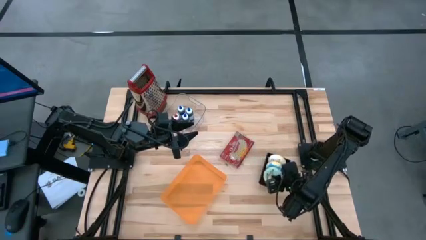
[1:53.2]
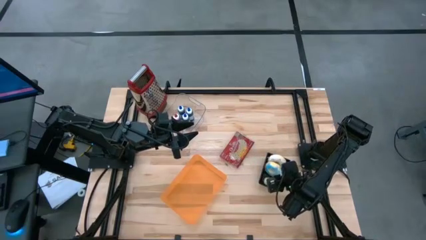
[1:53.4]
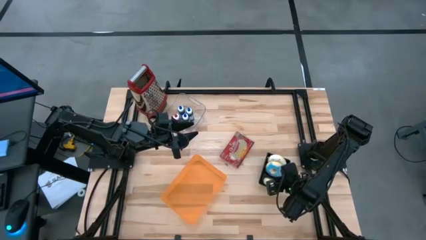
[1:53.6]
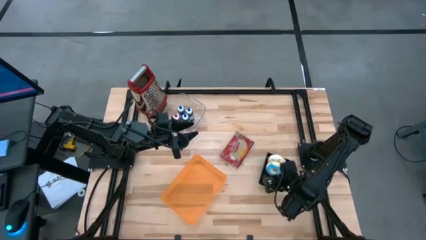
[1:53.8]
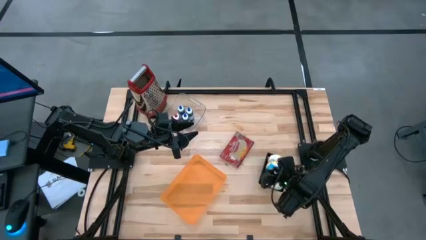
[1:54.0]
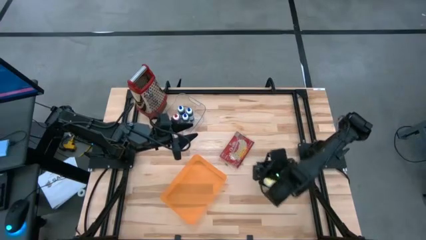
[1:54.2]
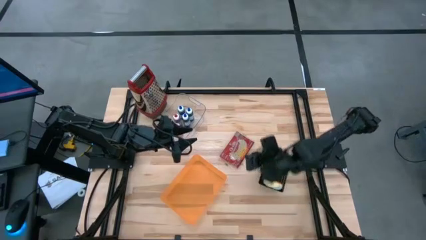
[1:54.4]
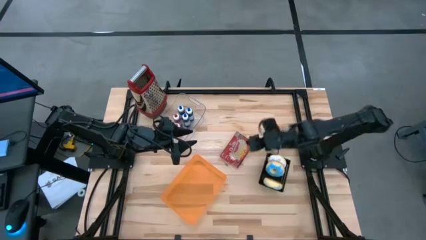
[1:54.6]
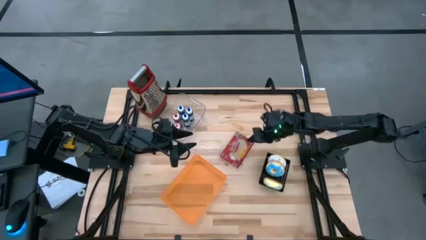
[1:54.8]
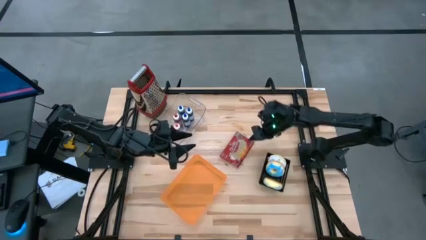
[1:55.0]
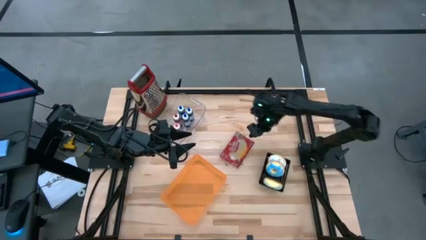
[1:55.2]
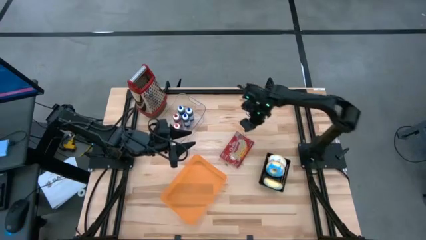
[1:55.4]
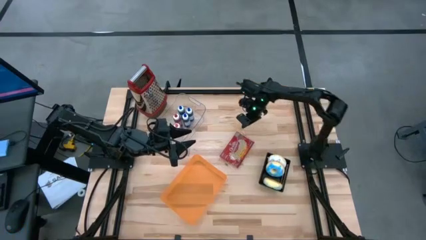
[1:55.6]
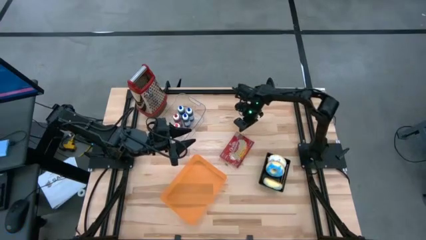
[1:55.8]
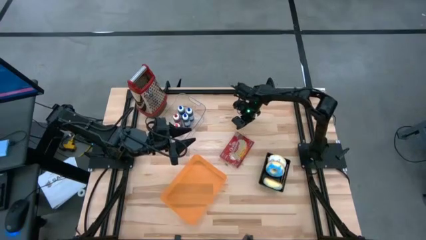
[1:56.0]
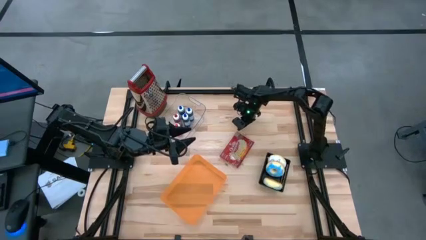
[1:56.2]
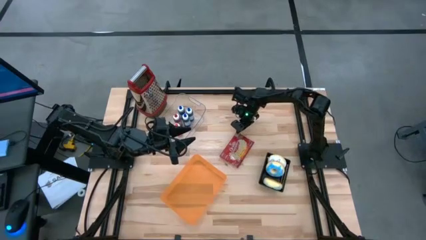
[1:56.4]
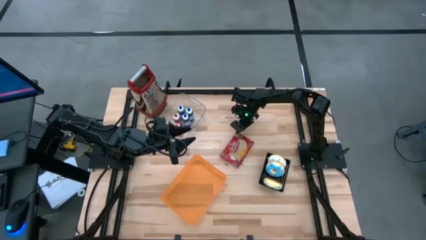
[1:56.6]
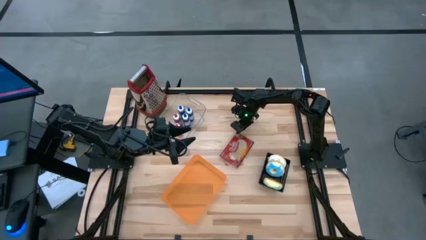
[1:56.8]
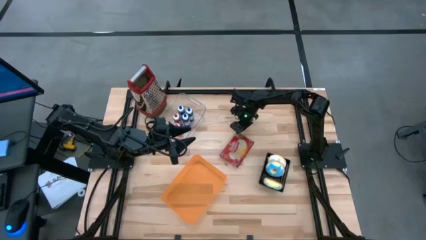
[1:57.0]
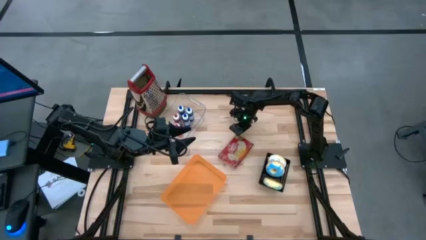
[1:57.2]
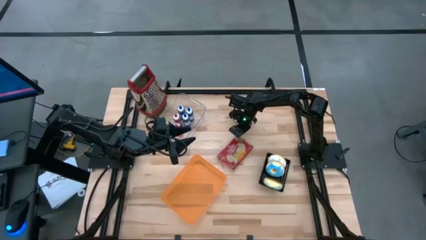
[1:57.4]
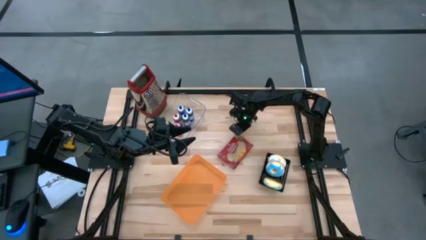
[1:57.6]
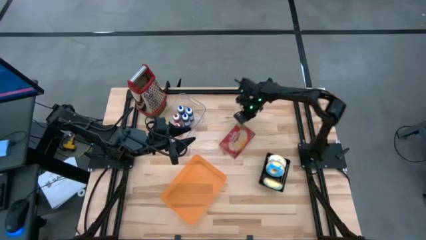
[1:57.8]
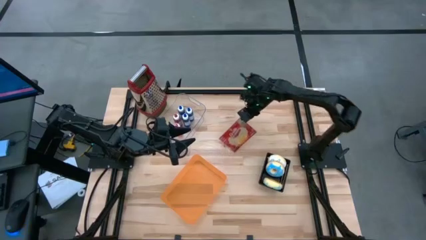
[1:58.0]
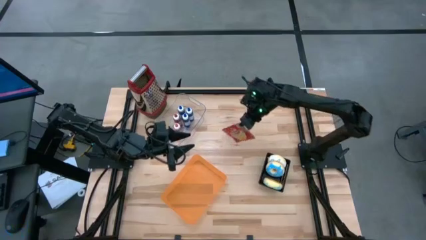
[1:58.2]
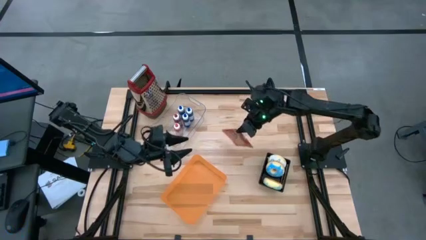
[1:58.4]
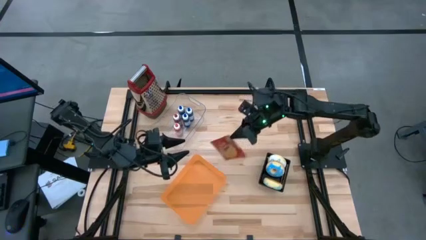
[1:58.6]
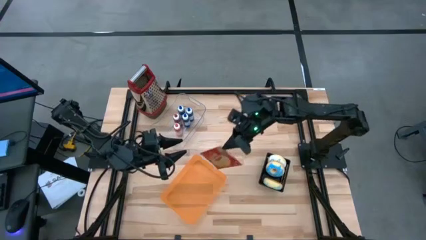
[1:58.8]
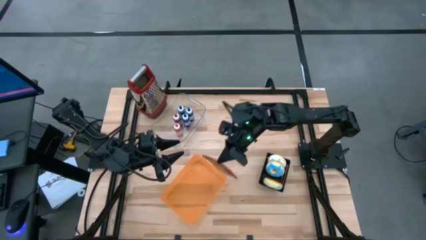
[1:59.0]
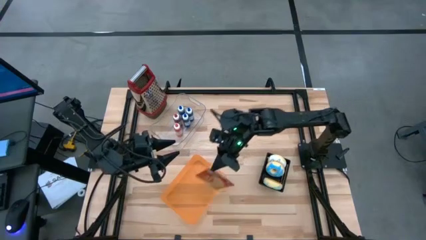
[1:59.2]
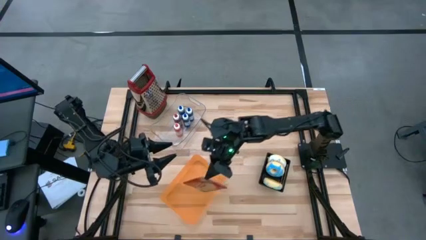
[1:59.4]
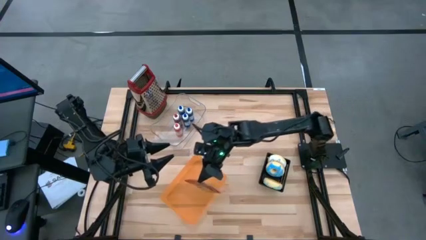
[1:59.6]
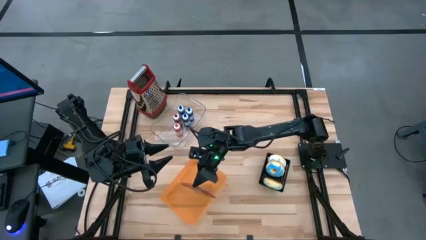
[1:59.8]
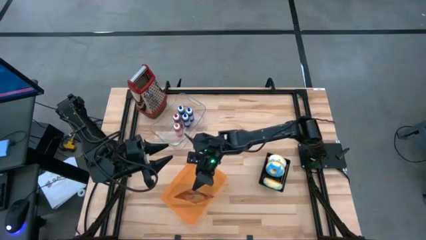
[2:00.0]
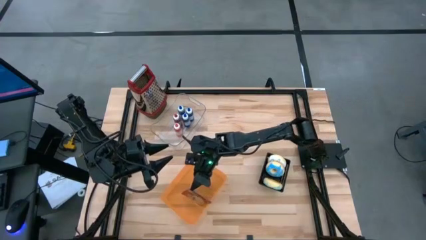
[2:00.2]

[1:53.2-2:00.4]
Put the red popcorn bag into the orange bin

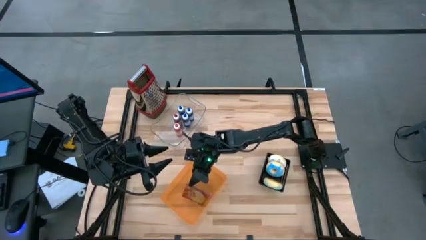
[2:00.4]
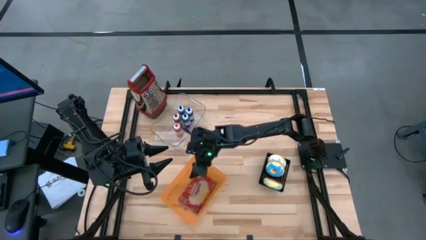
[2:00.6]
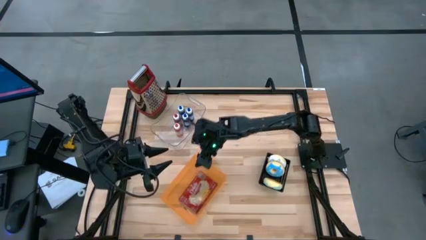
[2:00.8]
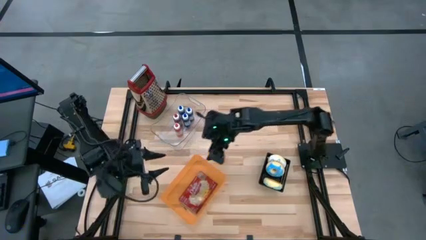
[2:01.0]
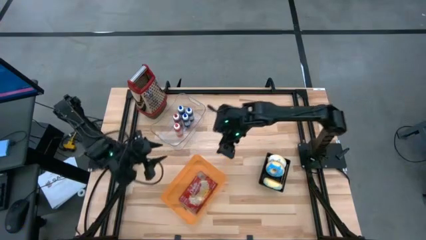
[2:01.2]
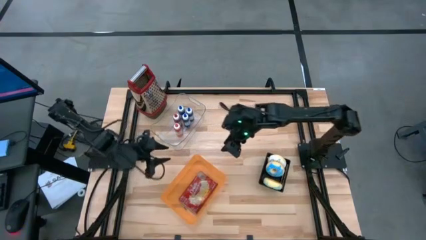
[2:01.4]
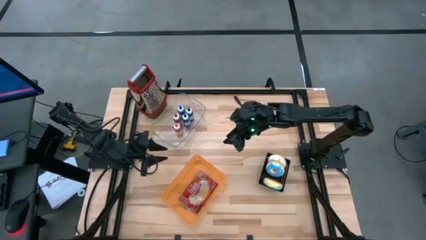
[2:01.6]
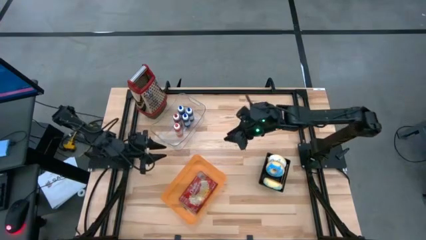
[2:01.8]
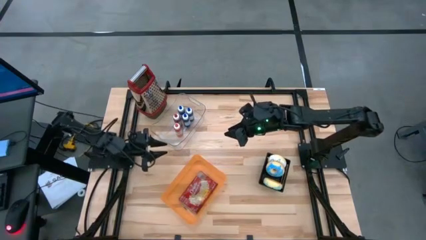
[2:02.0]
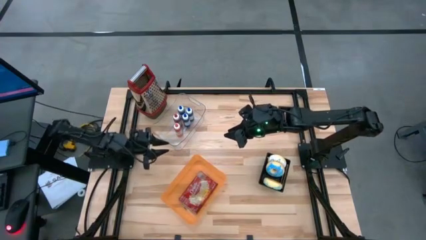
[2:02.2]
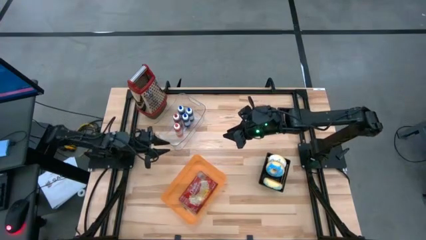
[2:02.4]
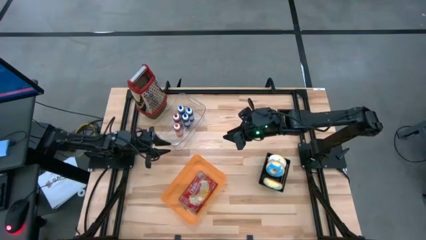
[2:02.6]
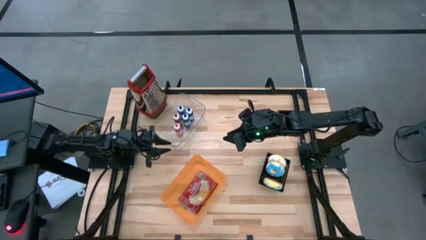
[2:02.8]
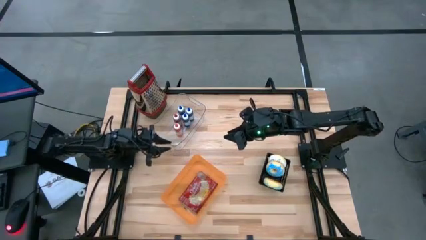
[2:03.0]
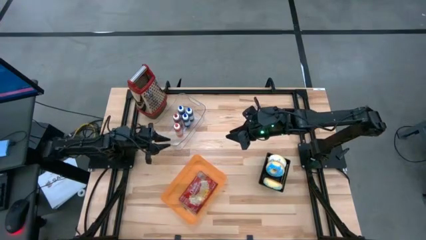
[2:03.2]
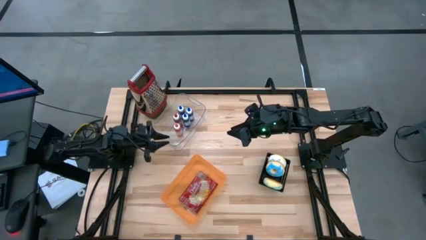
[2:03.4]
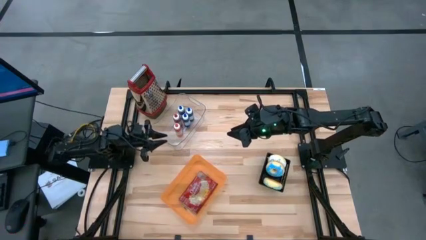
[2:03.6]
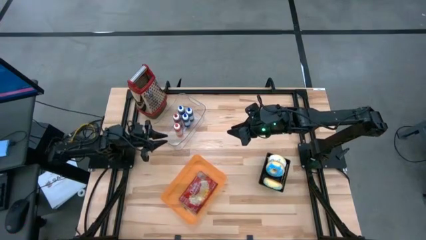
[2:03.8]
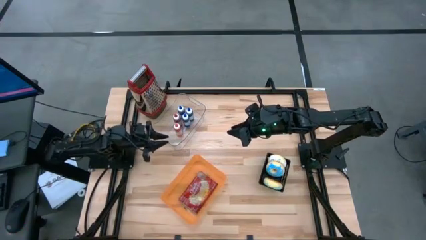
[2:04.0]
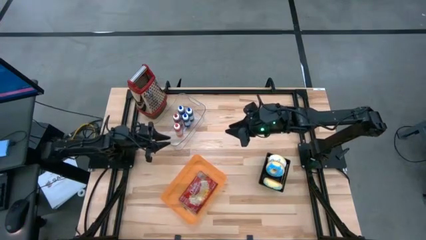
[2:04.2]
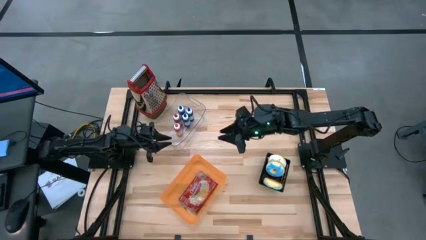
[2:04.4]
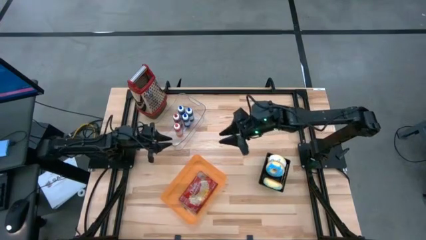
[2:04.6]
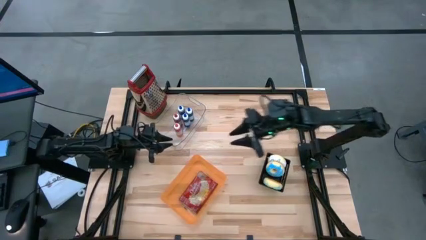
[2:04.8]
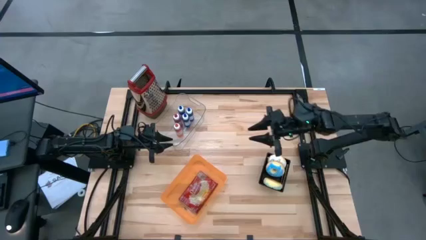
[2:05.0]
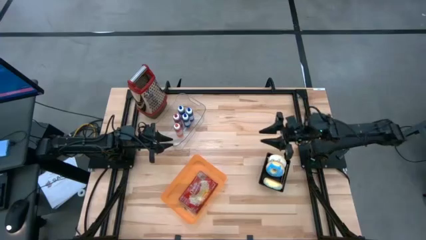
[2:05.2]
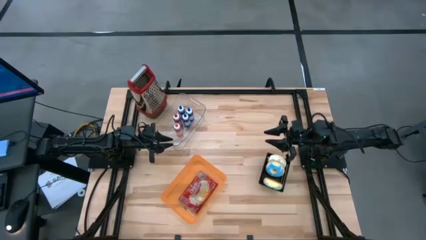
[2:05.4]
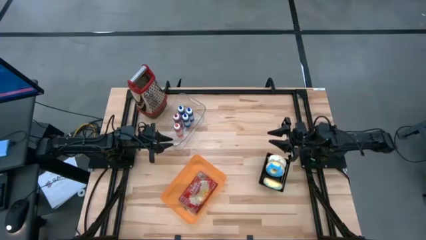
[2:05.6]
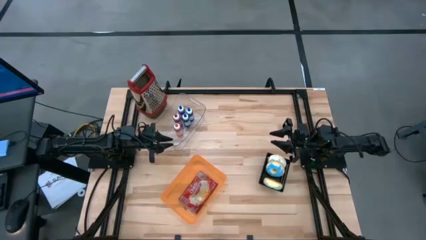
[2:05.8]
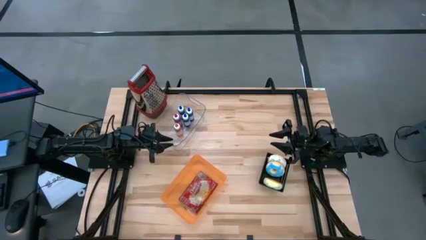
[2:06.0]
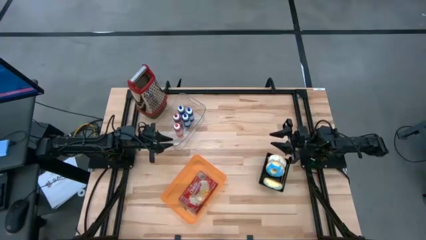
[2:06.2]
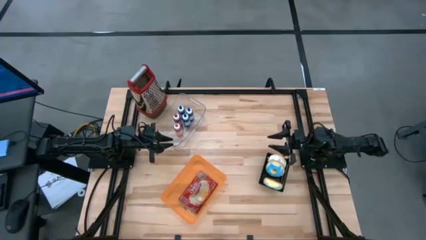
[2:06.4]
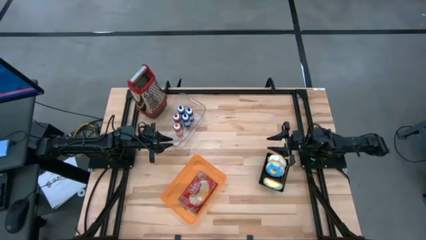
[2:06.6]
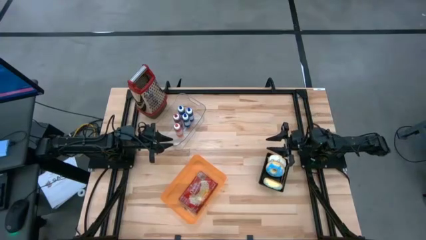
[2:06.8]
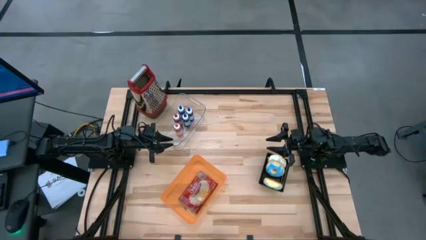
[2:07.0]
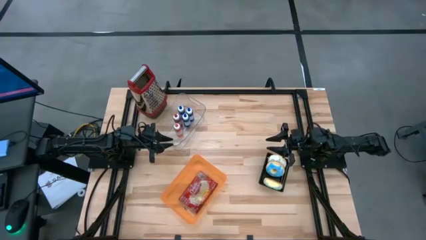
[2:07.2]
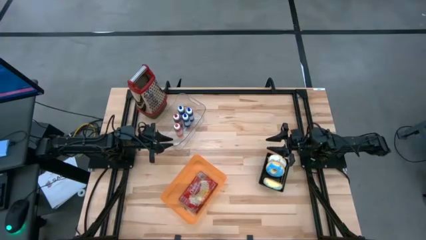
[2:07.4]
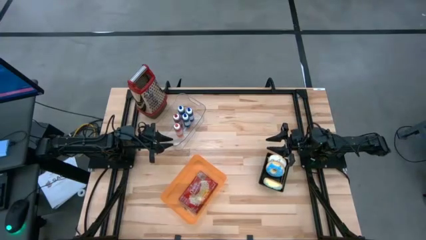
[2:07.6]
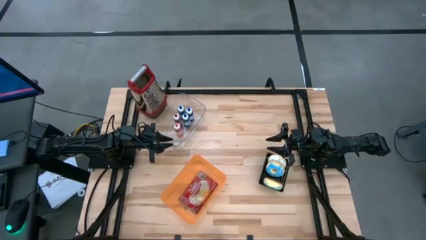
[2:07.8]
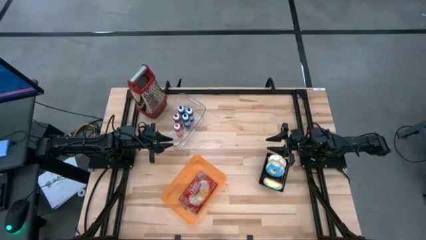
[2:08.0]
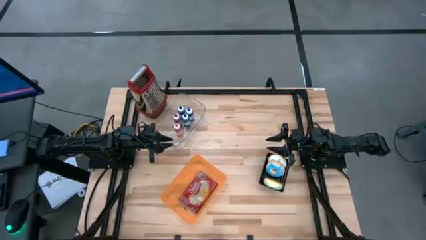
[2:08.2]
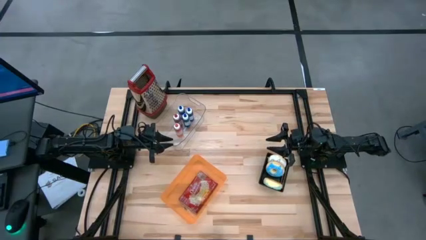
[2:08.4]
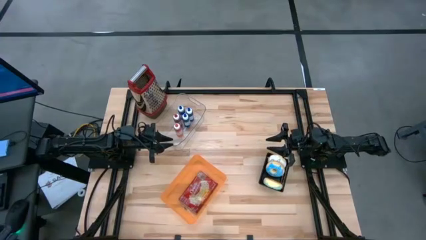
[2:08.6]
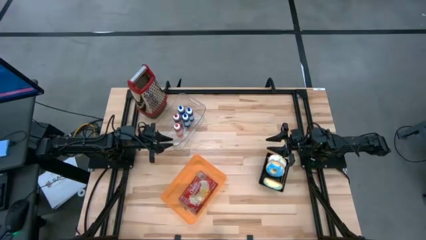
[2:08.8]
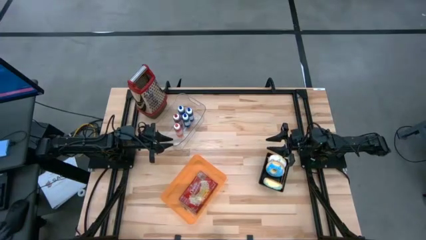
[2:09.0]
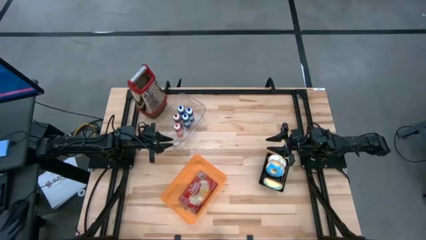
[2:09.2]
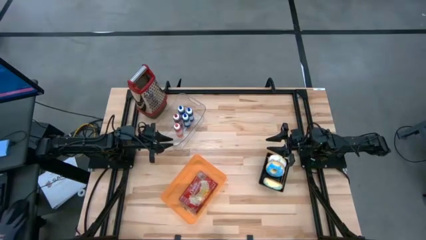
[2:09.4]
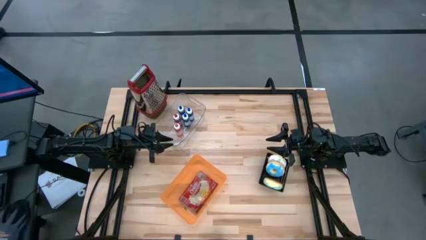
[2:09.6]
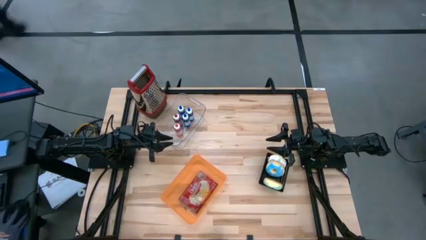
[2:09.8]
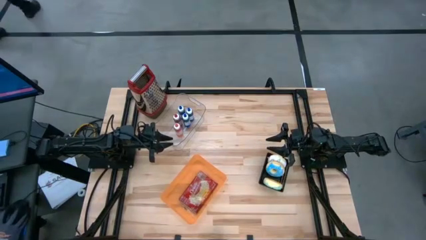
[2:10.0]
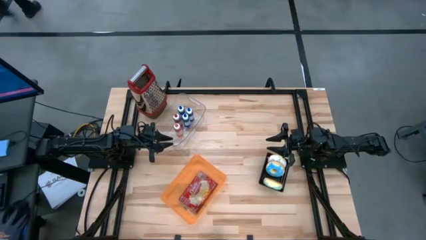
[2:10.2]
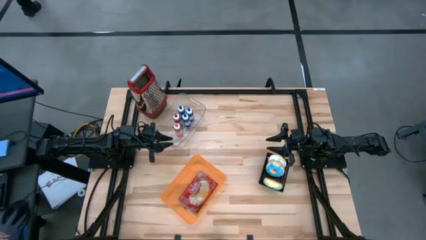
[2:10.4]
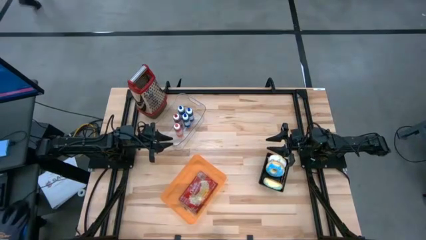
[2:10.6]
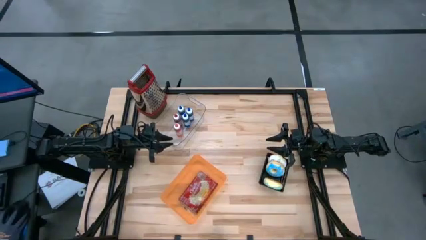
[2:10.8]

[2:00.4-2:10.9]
Return to Home Position
